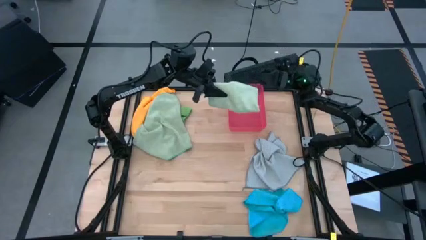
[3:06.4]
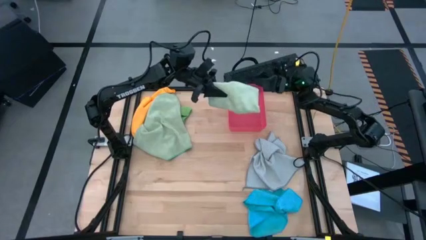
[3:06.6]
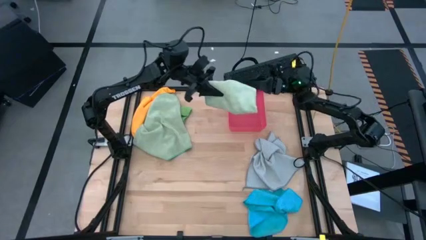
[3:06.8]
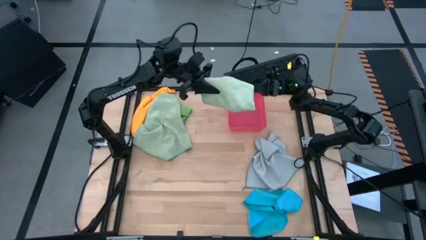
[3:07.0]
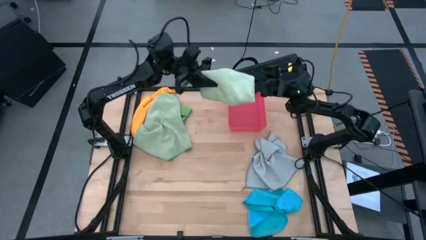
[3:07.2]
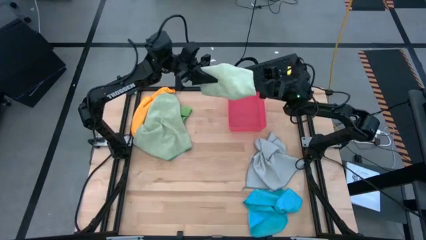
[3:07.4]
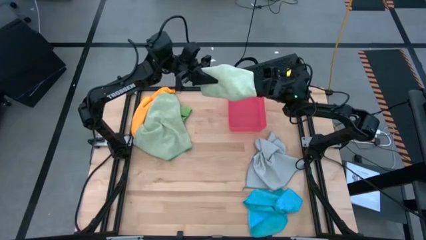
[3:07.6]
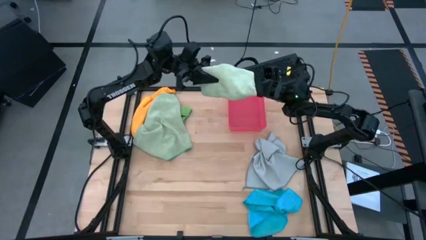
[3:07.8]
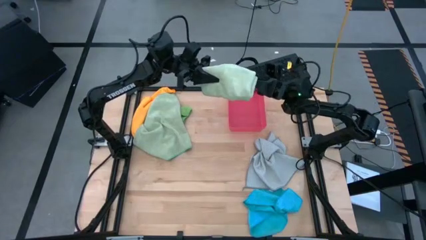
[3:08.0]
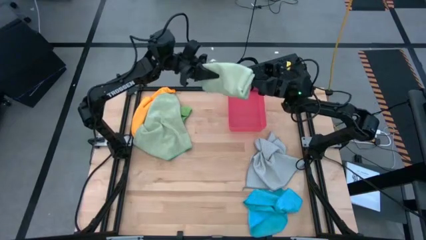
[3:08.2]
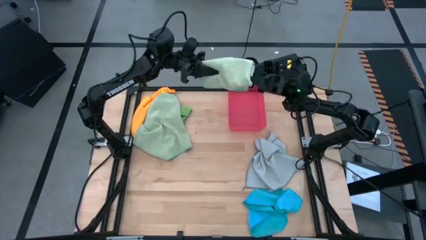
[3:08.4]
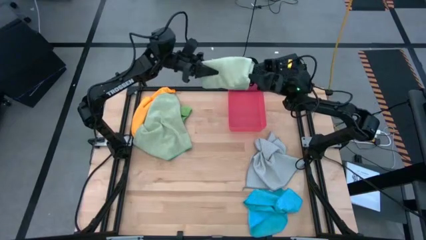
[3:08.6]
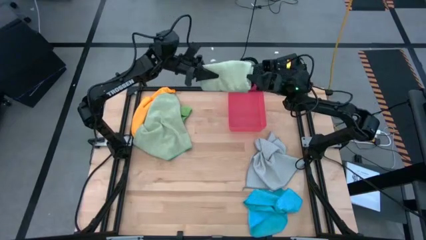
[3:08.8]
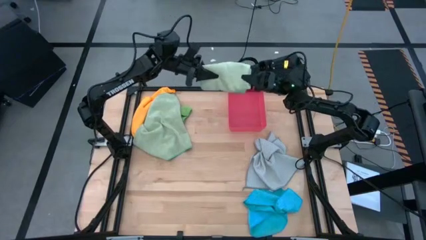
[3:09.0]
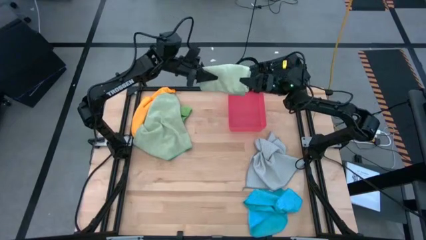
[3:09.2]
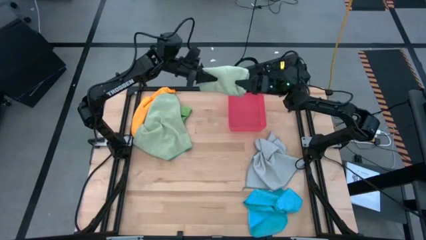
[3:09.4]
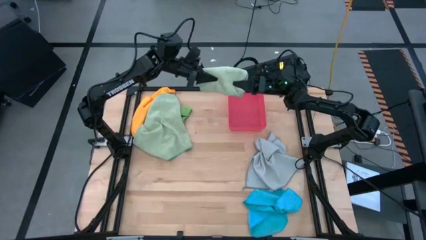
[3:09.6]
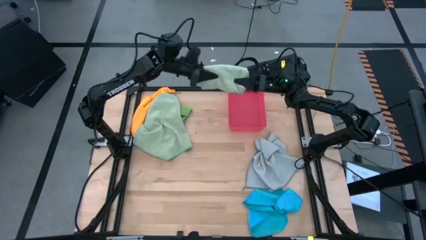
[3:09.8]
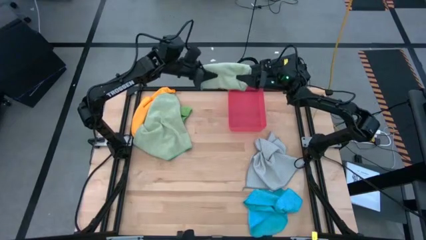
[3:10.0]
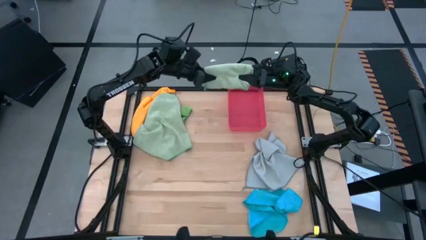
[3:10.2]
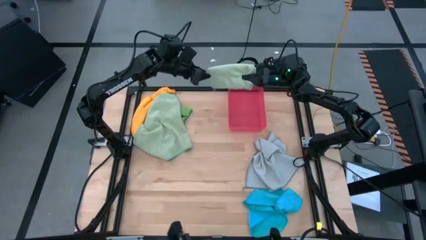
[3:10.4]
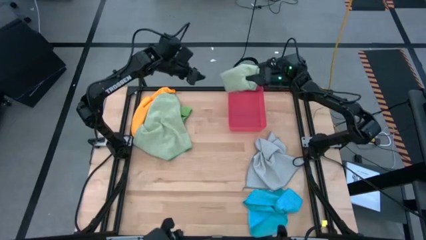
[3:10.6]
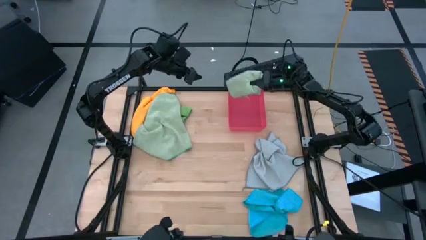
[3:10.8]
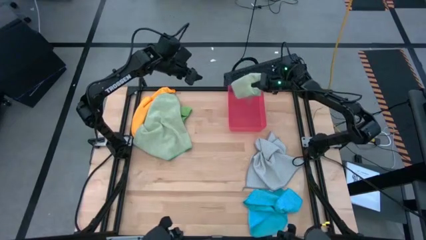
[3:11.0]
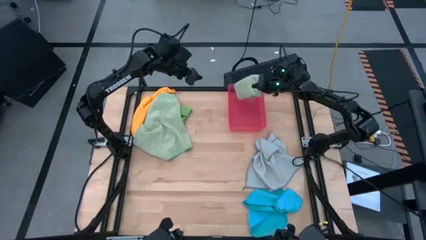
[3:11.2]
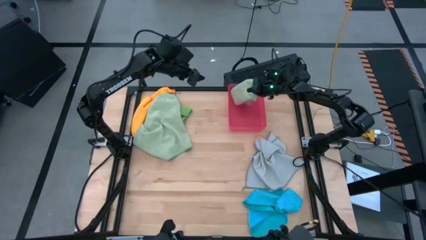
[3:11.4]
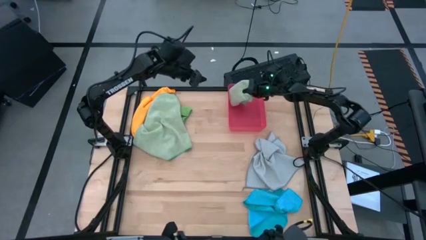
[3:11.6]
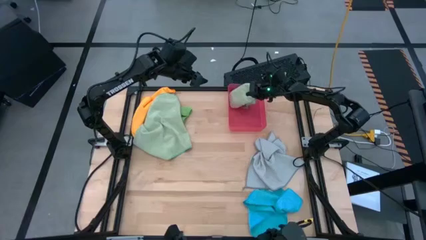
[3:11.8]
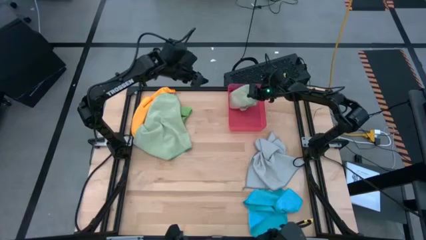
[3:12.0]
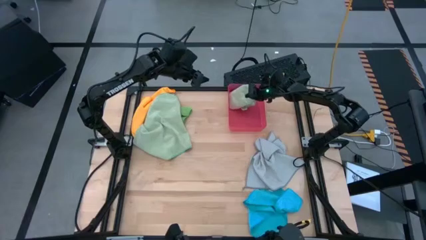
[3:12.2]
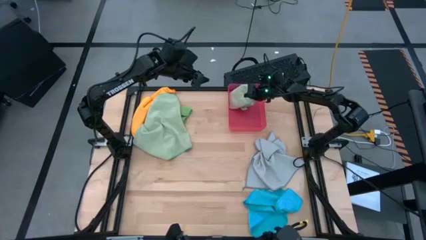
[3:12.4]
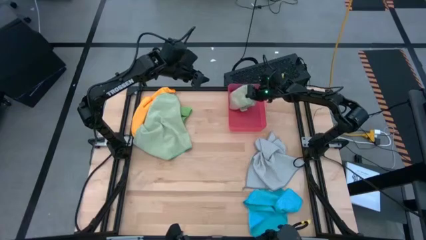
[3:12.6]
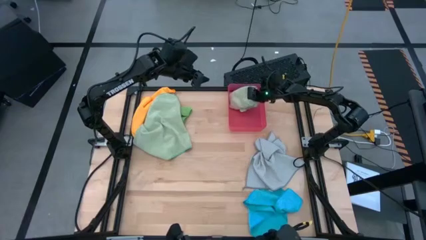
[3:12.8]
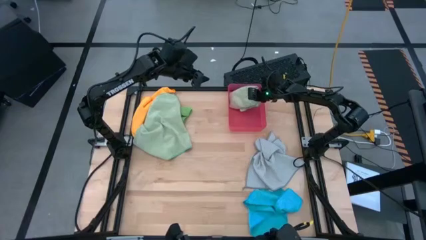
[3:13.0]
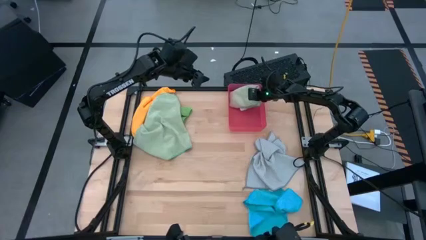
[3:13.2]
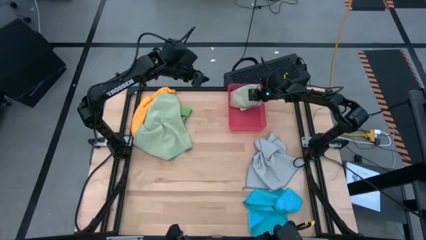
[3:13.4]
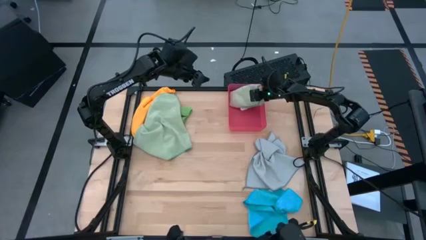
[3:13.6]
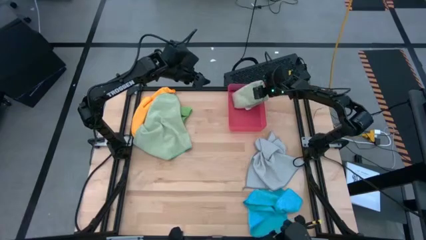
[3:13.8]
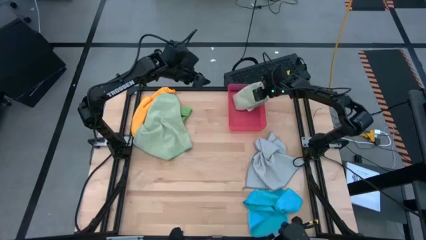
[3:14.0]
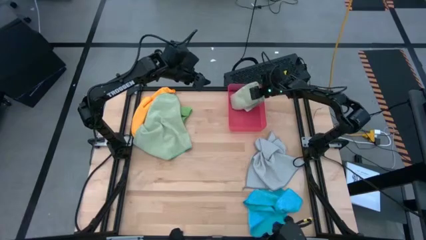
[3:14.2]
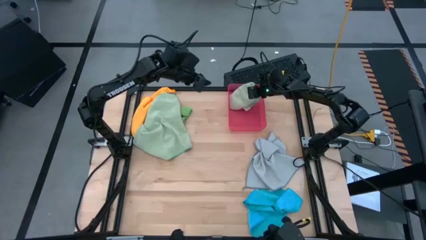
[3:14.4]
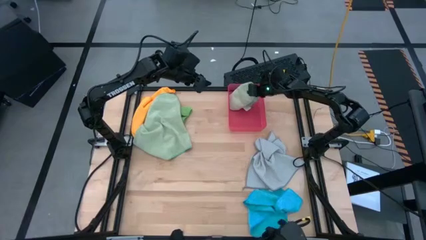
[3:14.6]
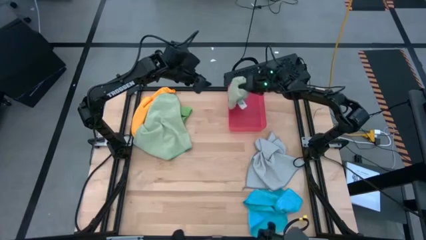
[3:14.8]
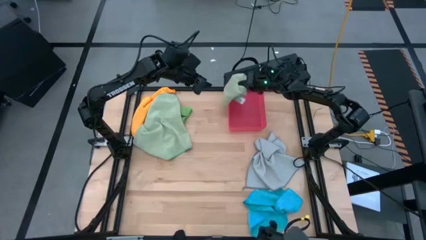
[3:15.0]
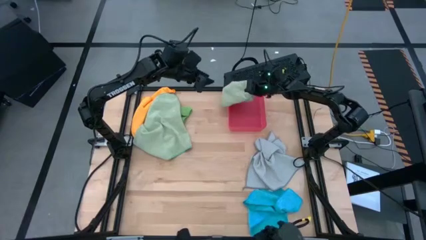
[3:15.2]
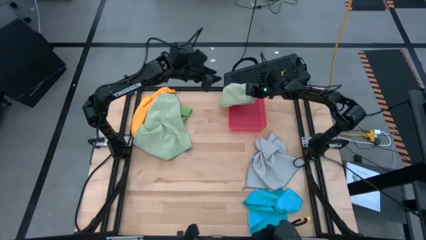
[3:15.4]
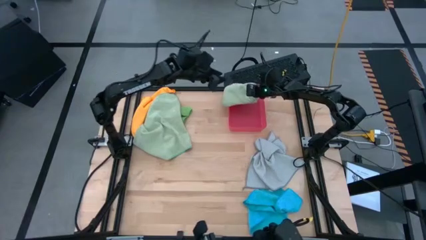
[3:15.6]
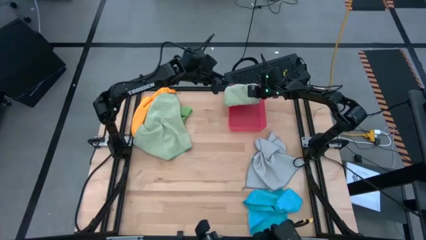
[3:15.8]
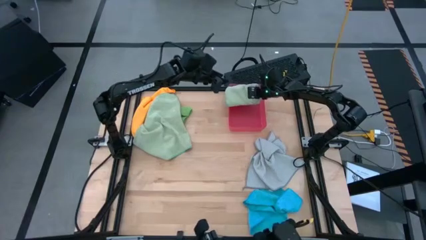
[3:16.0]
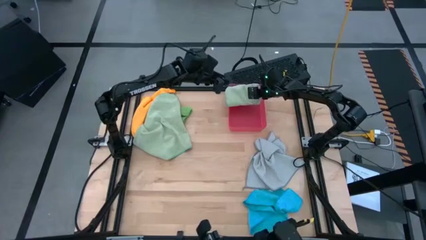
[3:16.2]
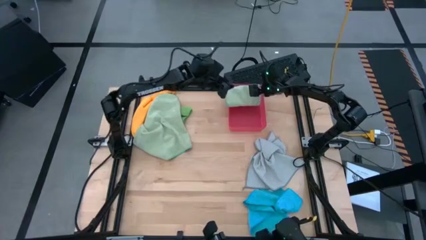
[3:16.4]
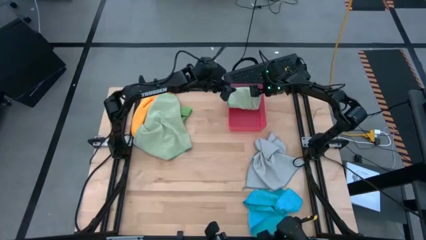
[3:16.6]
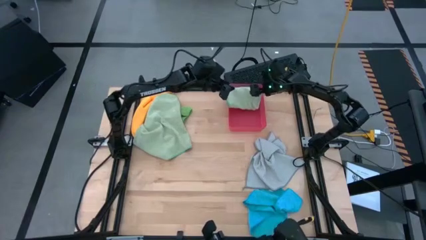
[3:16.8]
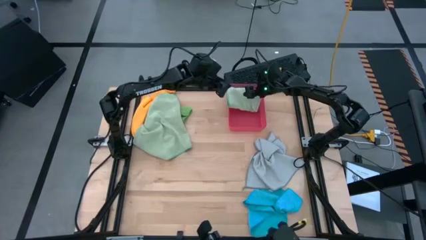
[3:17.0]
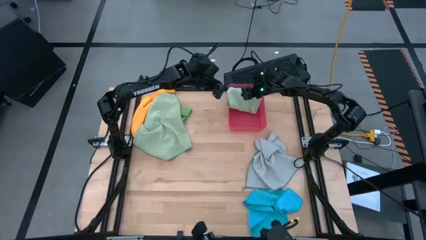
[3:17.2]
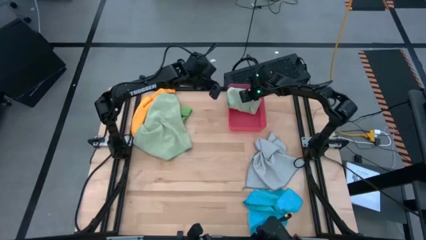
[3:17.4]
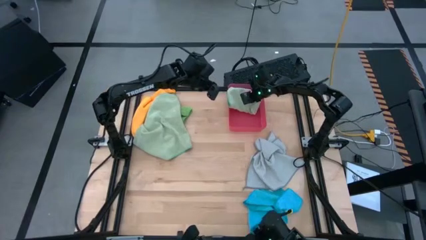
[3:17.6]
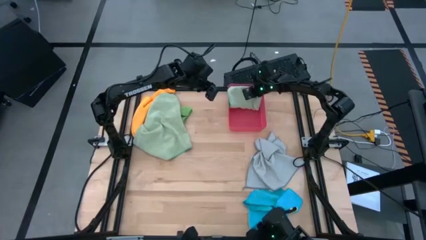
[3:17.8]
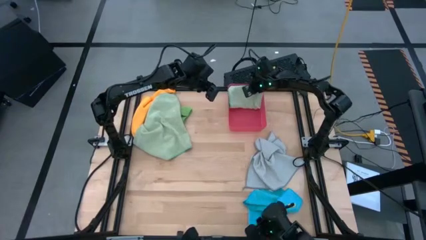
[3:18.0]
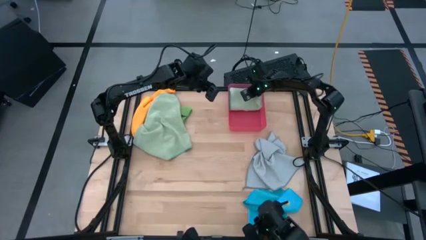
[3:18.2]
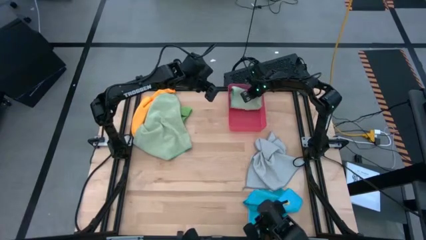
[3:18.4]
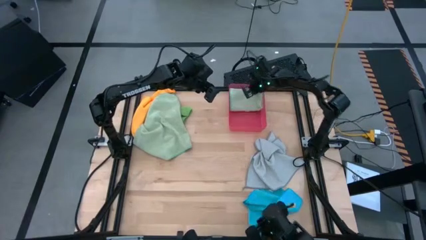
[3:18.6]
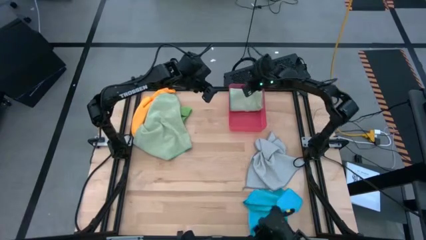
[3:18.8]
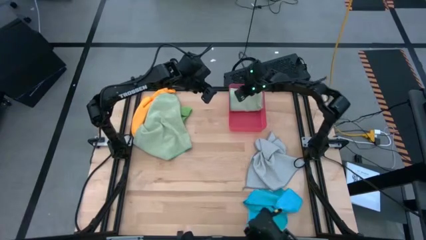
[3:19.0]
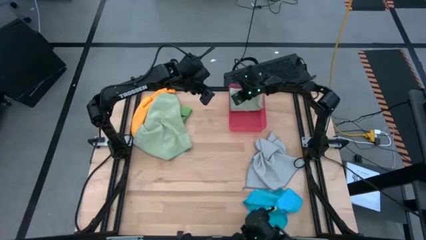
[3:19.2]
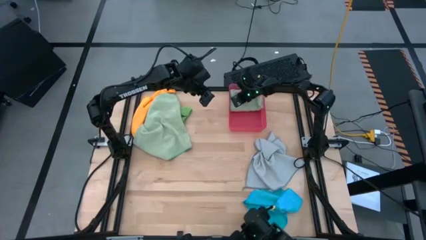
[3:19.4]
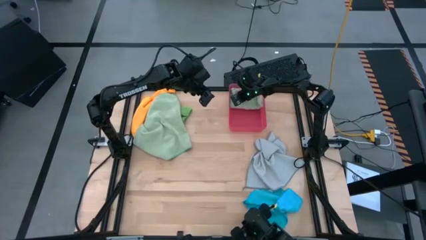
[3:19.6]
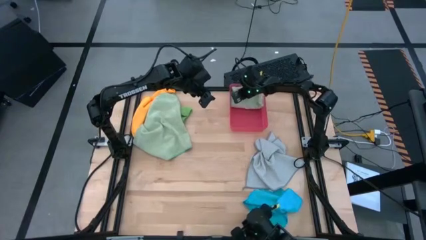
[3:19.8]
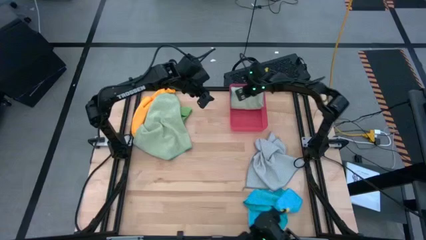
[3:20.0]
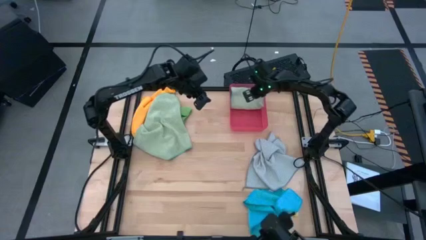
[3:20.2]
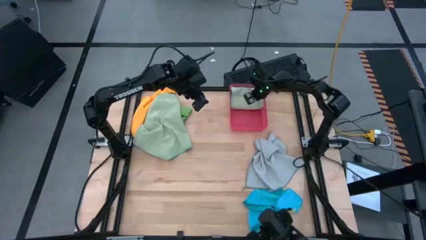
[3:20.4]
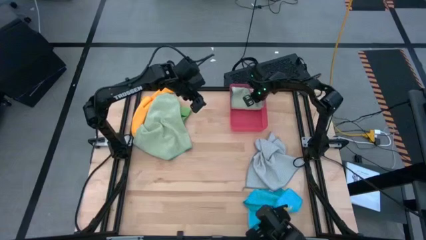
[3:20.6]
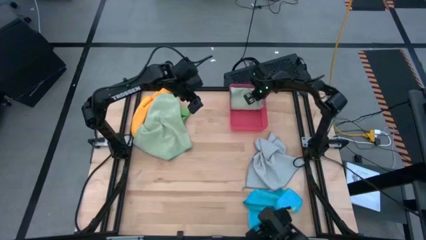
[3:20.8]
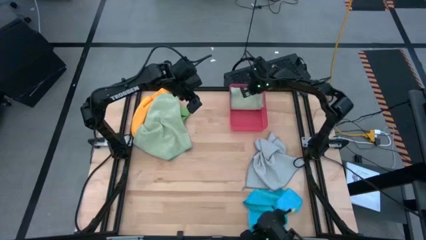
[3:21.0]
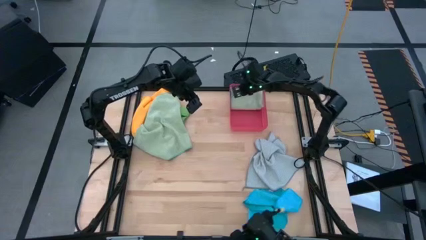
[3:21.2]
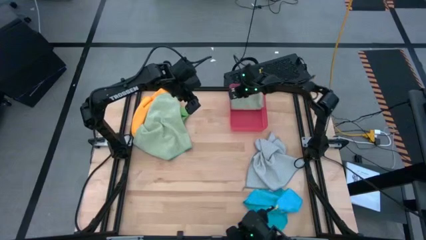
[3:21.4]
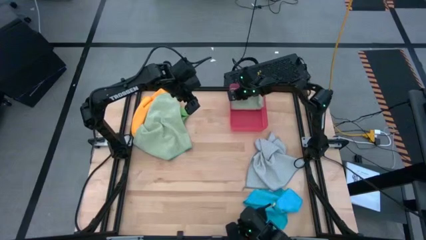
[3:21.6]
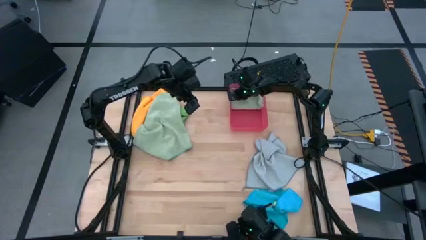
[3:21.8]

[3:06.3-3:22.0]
Task: Fold microfiber towels
Put the right light green microfiber cloth into the red bin
